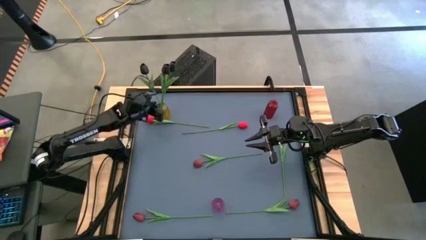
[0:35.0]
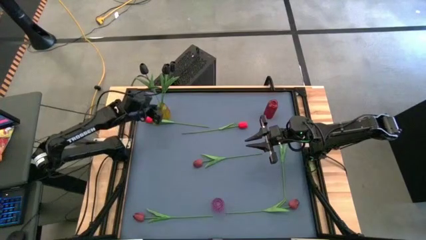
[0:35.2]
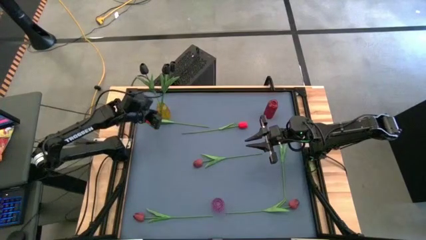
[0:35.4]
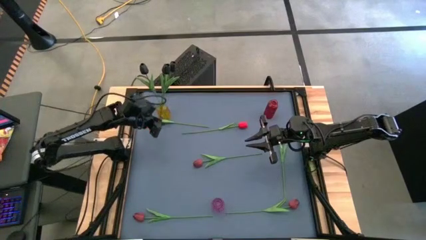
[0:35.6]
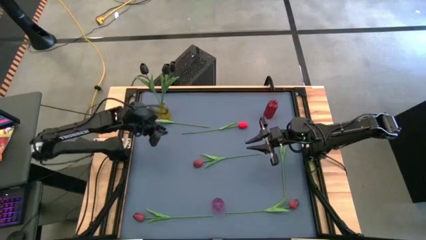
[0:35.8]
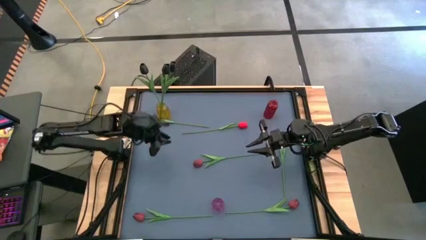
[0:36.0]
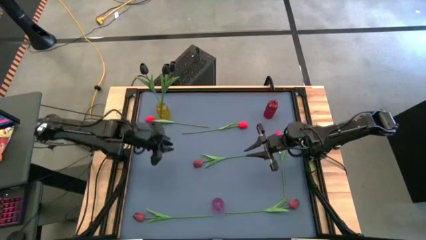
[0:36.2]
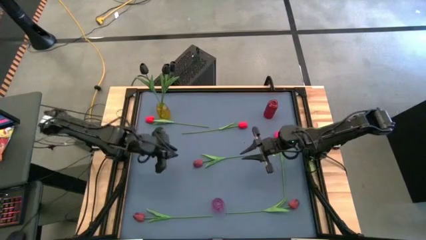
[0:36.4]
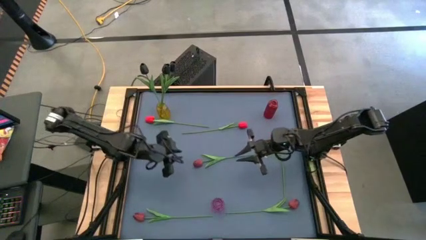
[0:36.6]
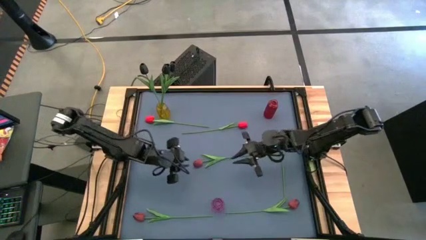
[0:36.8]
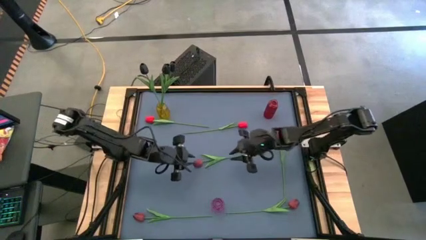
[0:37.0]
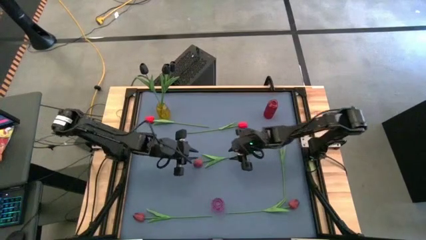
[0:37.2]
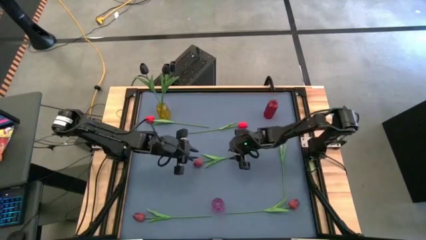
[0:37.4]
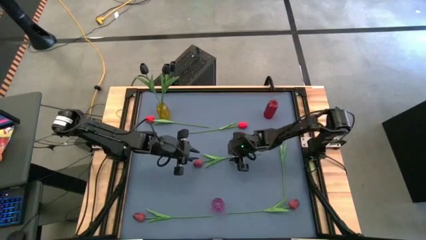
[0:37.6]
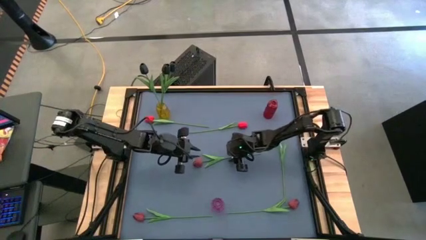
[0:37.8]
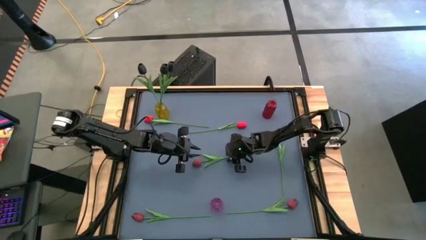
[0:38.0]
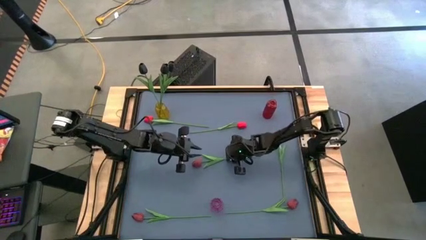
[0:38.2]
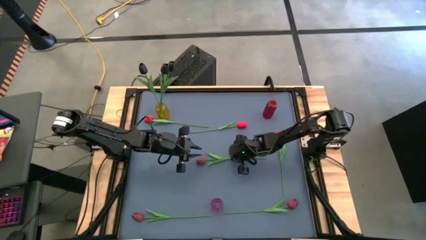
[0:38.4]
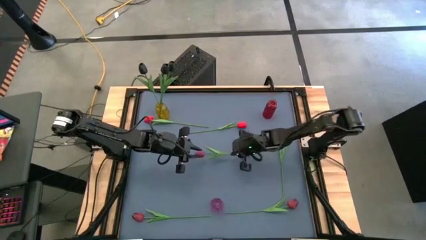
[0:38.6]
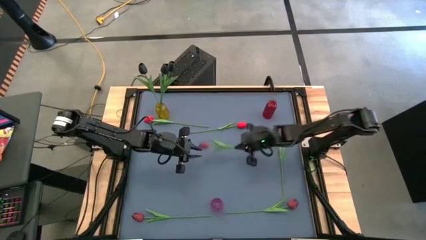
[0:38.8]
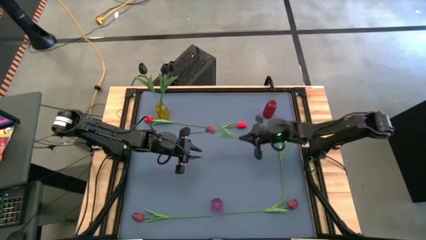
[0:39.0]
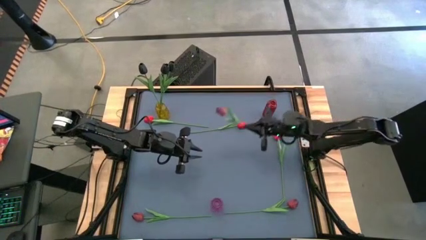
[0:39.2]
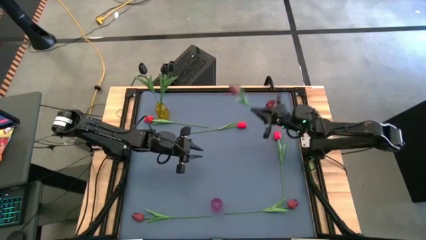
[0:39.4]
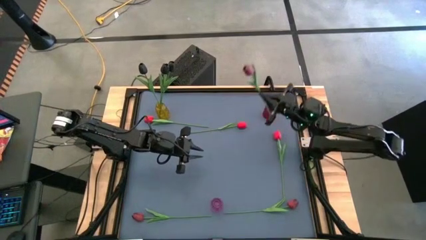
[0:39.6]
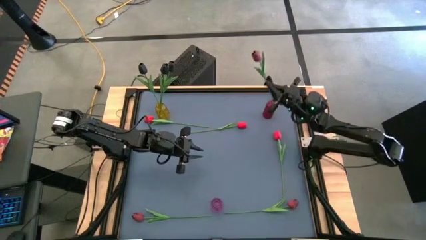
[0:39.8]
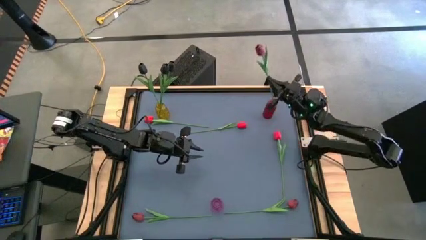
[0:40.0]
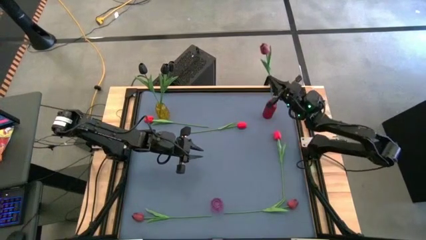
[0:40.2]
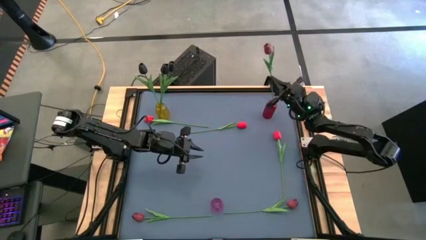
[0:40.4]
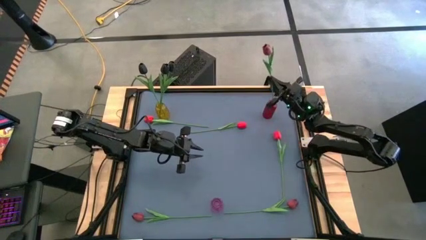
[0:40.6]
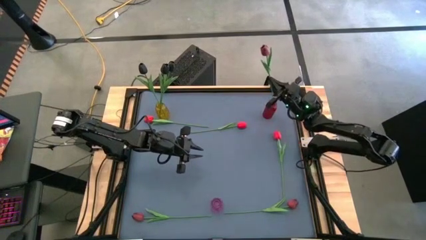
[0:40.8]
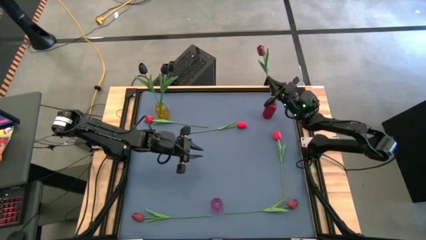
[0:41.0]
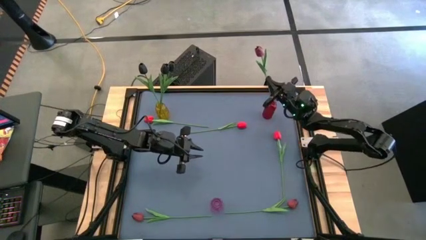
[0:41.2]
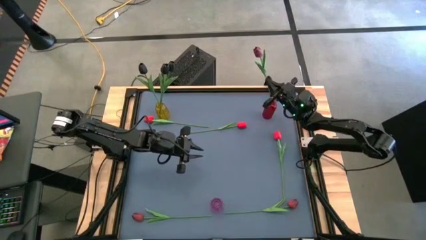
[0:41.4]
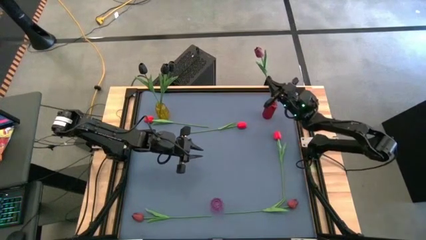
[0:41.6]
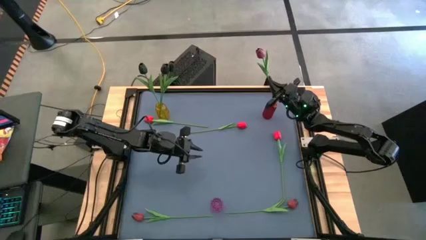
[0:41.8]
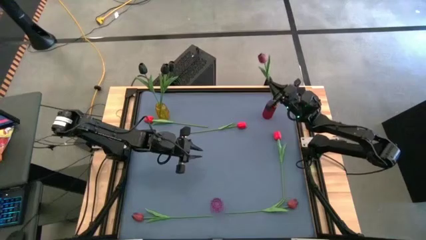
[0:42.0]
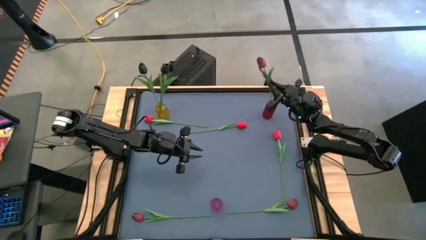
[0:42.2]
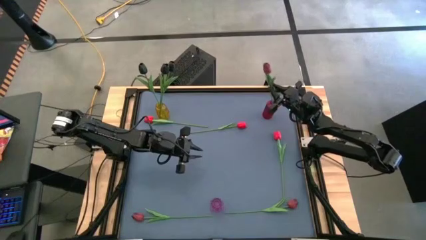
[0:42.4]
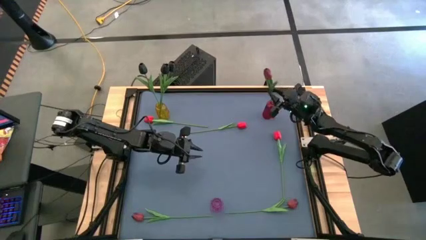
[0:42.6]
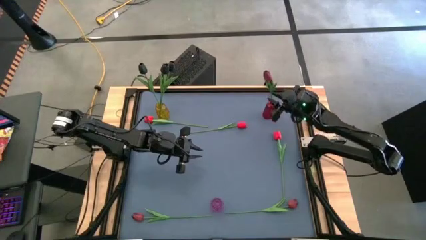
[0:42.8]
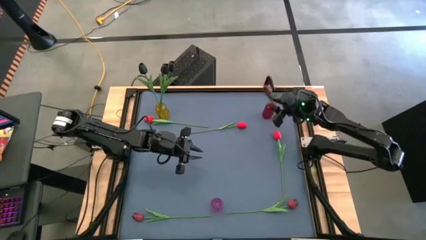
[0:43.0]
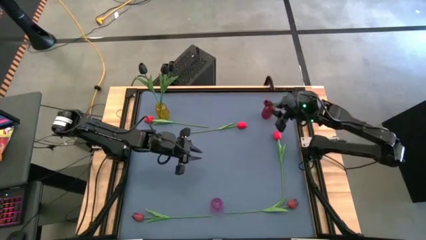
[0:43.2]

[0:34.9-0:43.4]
Task: Sort flowers into vase by color
Put the top purple flower into the red vase

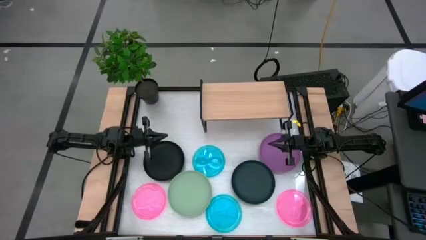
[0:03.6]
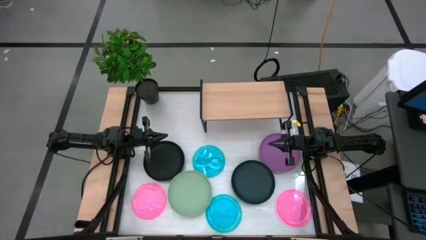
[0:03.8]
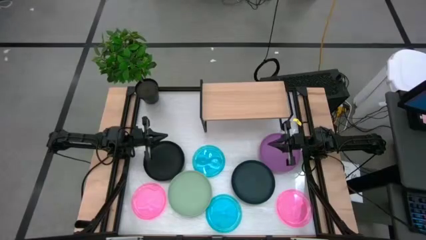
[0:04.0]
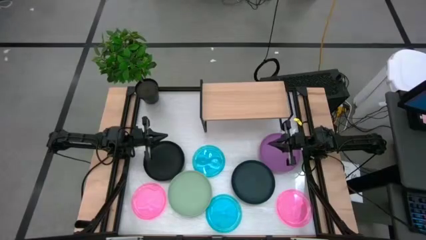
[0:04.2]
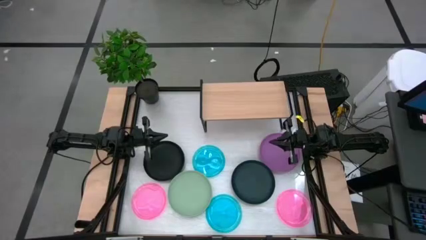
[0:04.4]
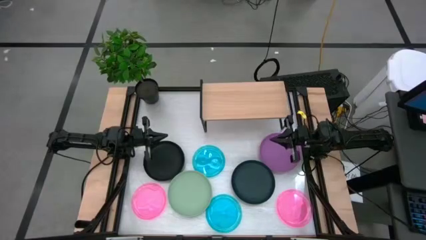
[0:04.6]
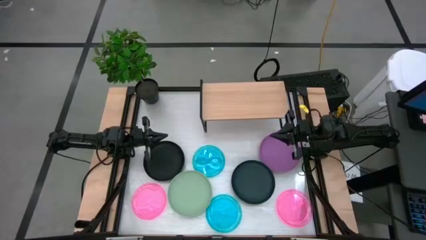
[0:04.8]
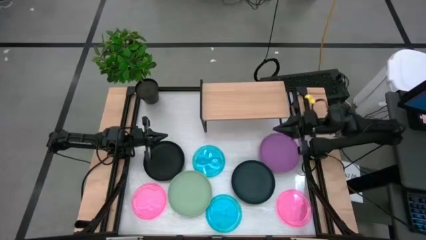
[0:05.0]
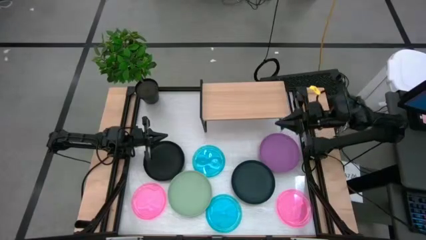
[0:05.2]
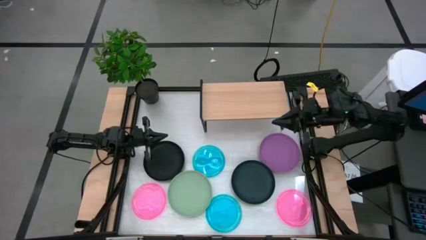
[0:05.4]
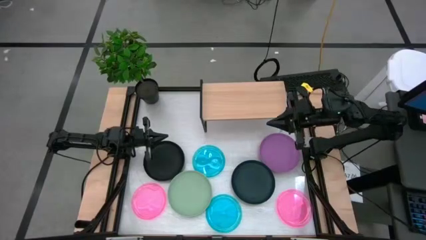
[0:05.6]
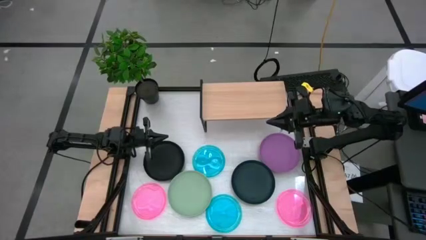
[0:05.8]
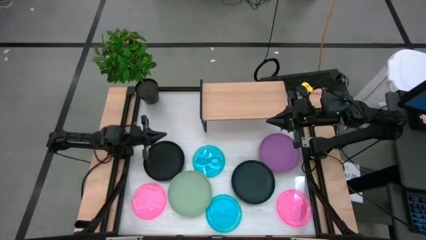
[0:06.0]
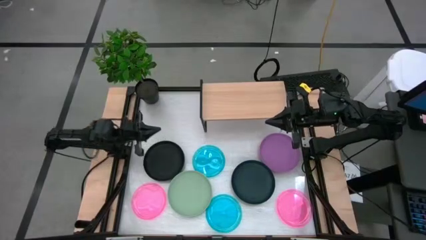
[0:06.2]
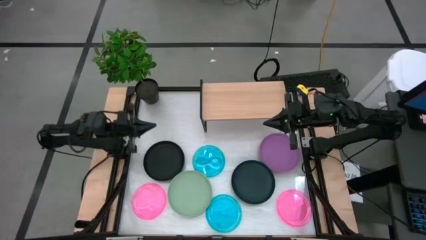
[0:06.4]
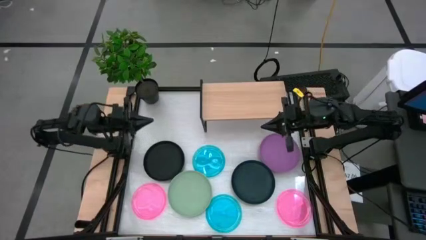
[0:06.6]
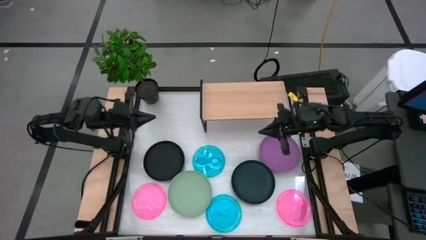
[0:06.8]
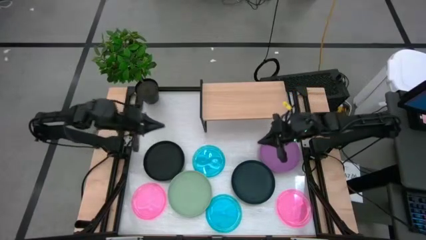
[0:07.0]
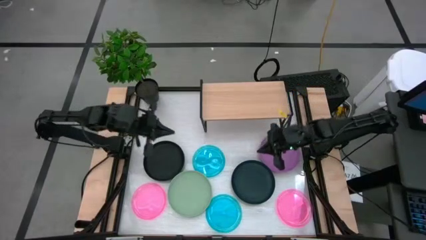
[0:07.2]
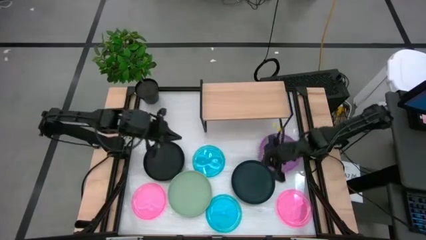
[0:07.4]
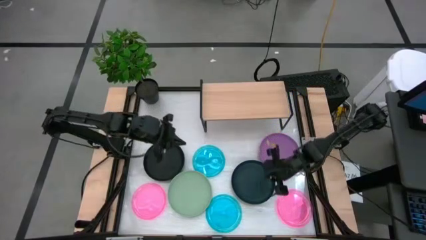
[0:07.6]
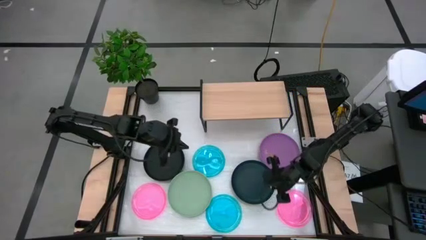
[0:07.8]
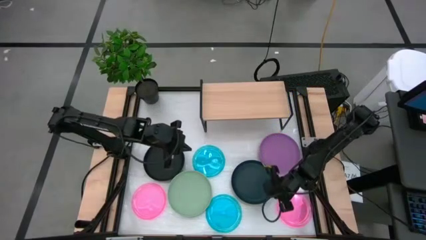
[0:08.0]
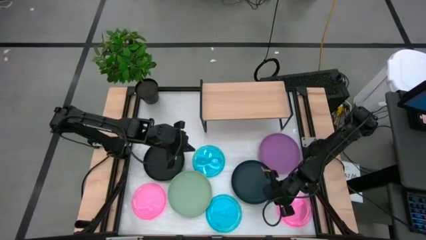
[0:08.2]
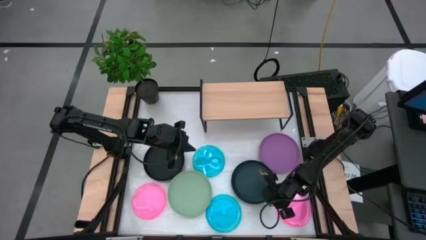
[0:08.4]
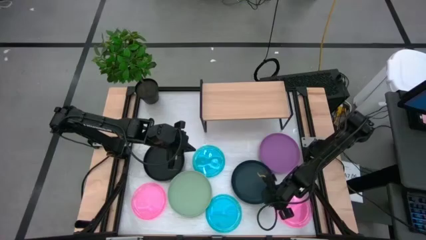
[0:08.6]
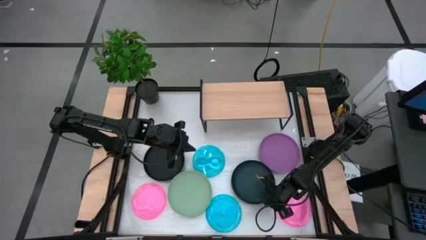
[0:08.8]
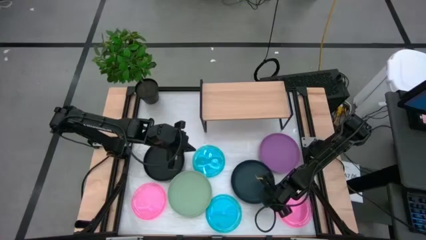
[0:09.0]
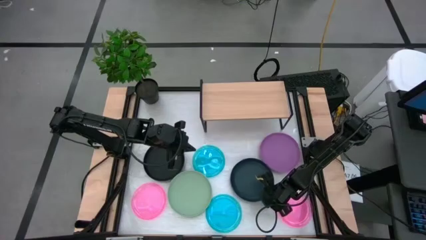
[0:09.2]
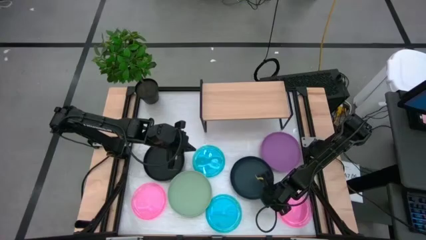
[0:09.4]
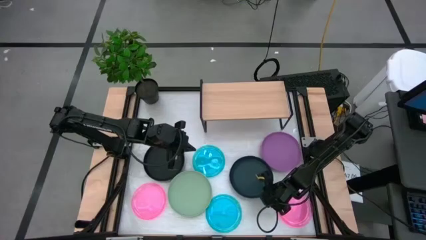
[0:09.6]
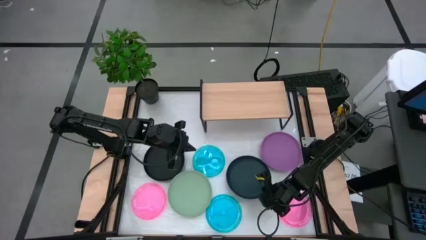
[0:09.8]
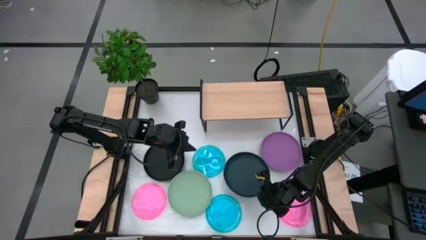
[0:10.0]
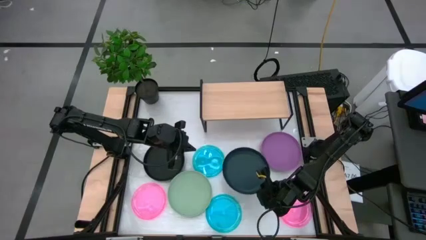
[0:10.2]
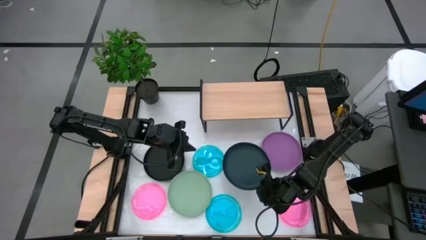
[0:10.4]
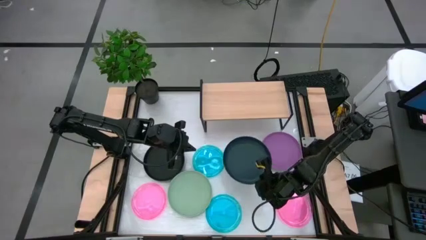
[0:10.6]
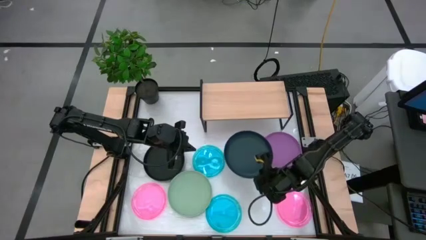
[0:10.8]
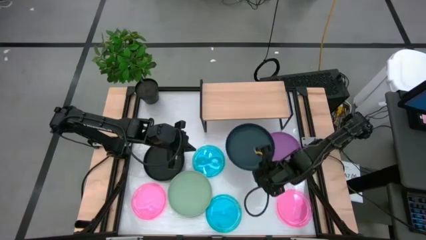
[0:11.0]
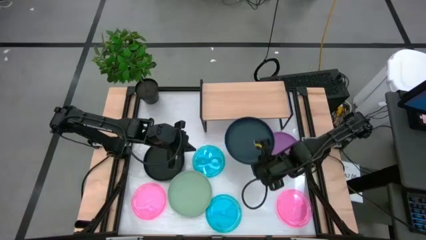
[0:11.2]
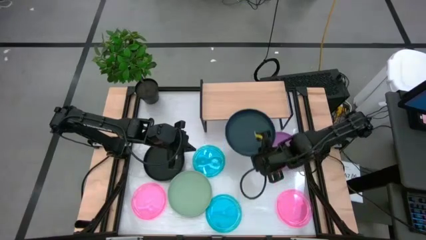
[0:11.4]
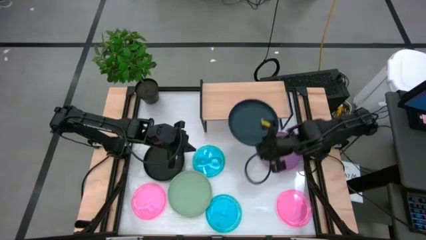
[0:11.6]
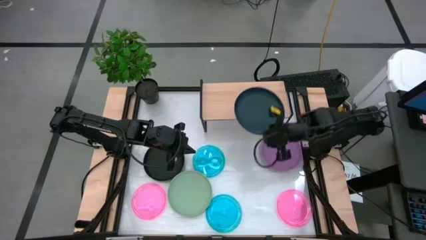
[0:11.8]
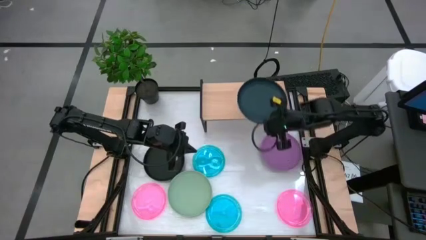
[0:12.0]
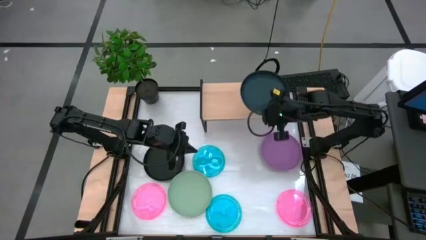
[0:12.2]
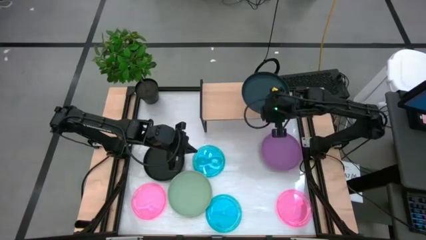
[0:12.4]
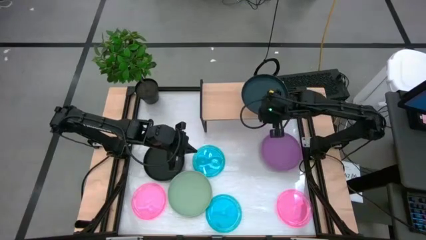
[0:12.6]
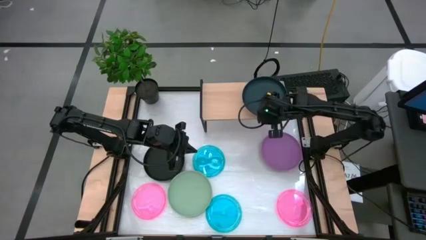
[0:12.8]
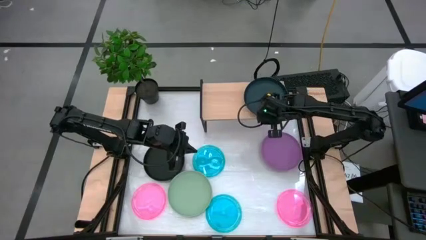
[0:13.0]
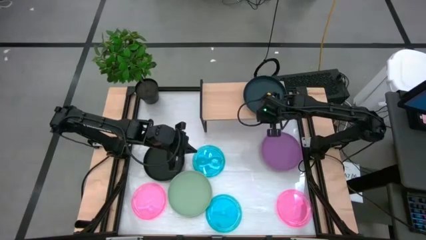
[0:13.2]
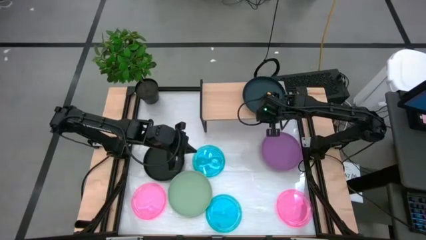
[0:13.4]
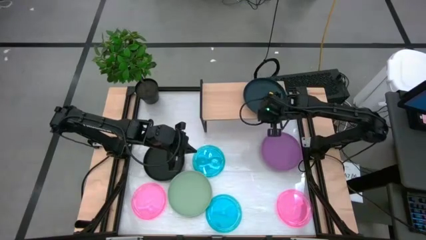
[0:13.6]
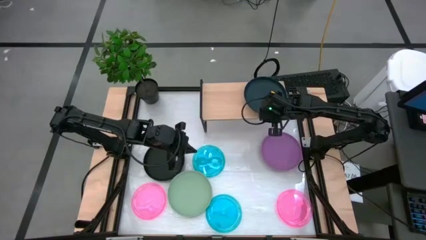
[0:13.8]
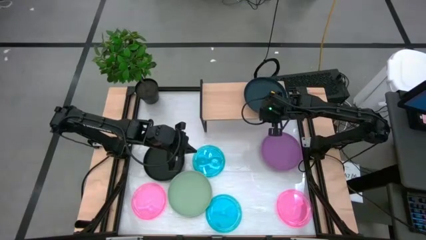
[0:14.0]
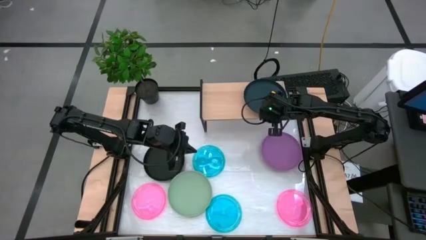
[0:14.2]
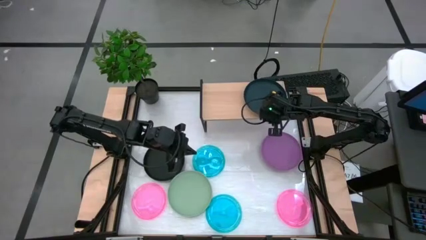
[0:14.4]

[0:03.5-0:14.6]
Task: Place and stack plates onto a shelf
Put the dark green plate on the shelf
